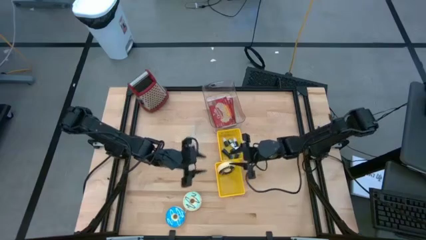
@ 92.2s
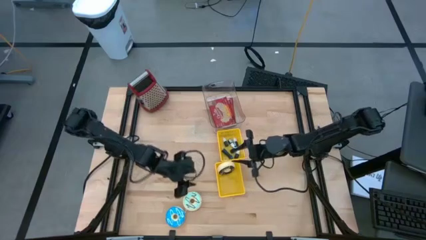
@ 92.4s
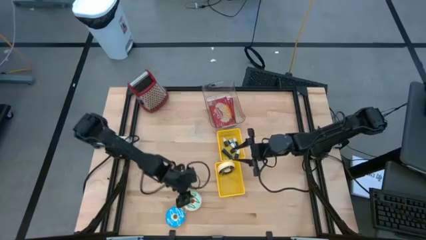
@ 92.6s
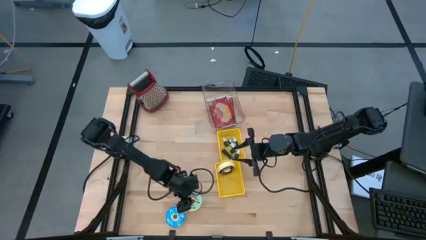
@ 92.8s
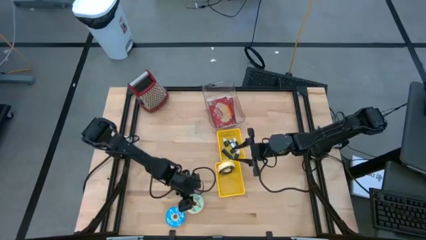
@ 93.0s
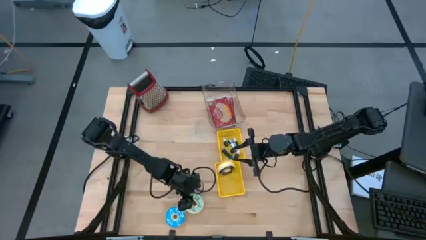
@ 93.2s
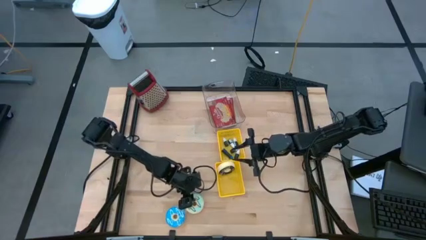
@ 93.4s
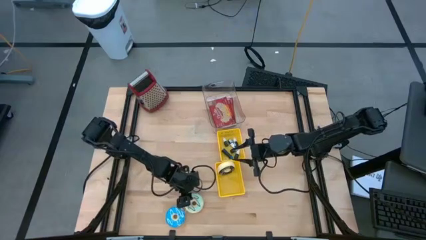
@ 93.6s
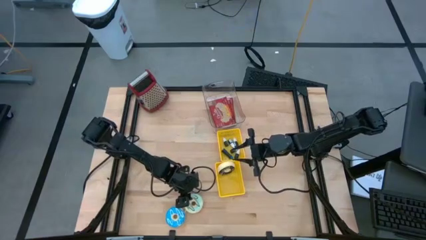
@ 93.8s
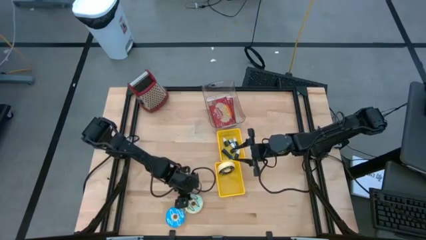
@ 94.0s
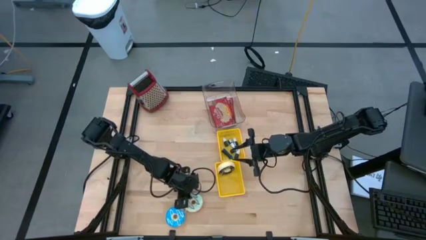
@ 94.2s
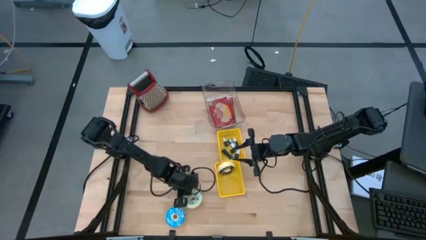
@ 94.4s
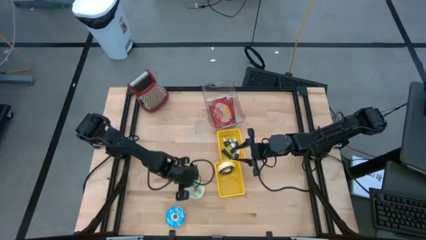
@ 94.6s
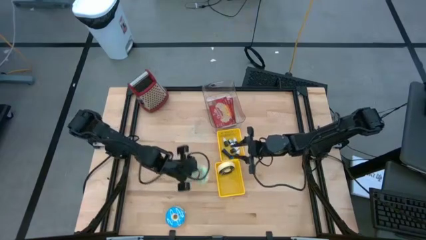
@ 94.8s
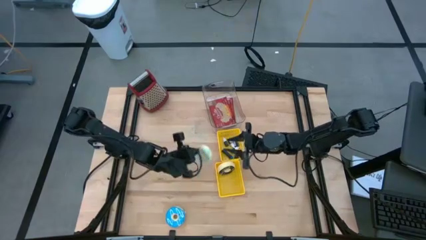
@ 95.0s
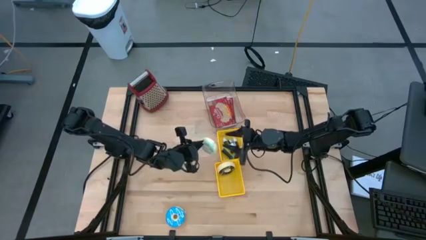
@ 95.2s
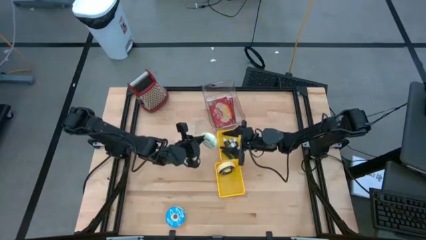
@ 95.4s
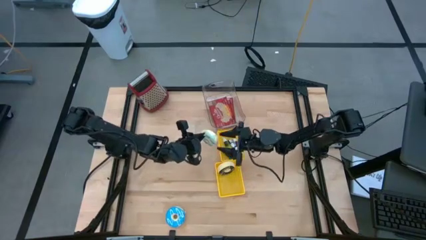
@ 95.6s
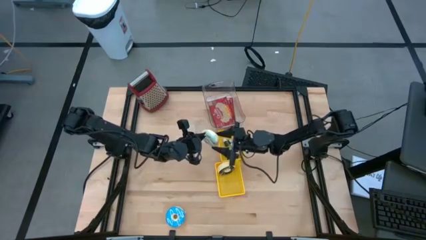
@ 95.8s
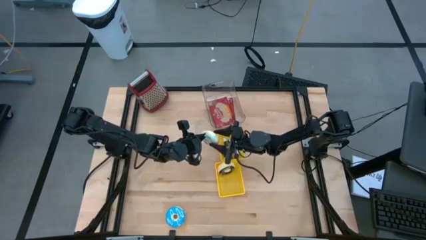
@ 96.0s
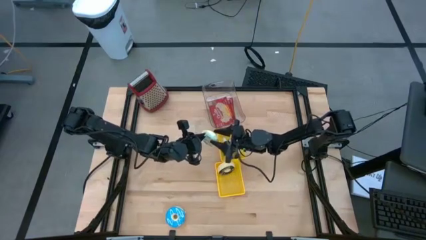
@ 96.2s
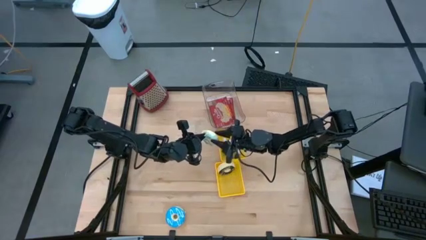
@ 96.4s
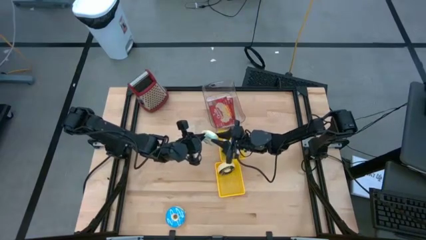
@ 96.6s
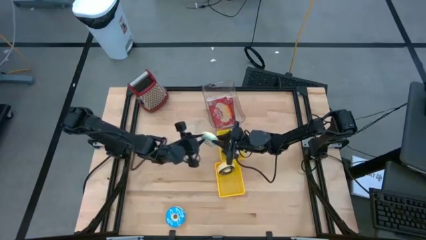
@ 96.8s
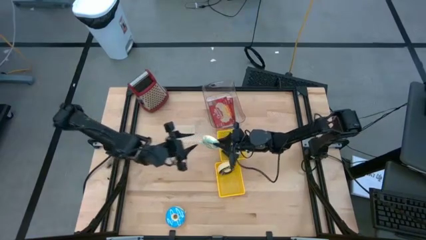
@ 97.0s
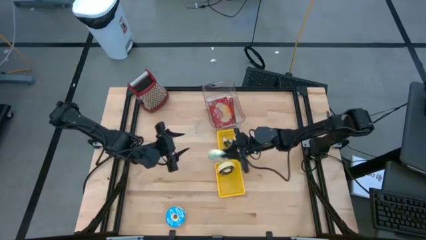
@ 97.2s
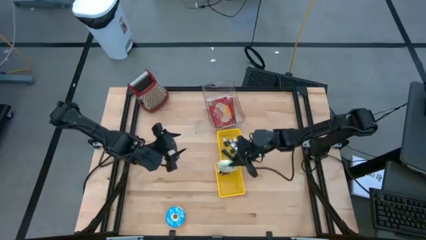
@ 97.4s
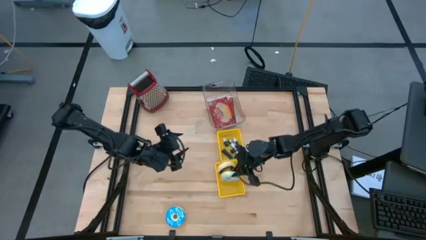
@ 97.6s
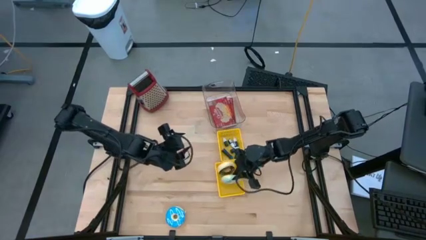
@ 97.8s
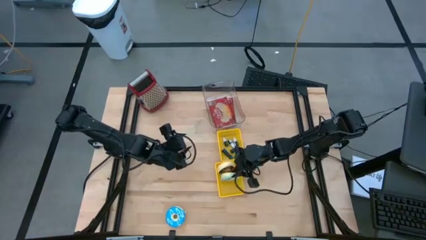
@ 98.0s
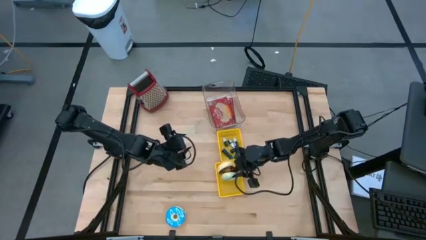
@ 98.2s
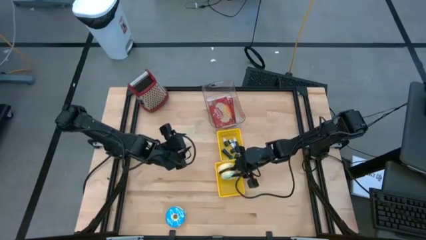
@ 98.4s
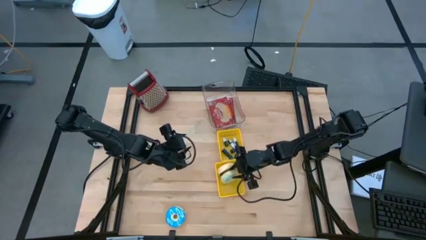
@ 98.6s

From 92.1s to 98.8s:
Put the light blue doughnut into the bottom yellow bin

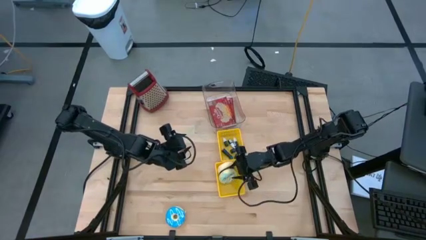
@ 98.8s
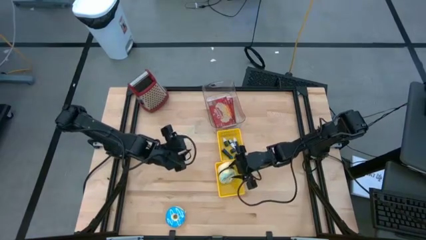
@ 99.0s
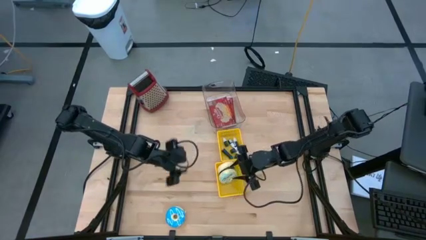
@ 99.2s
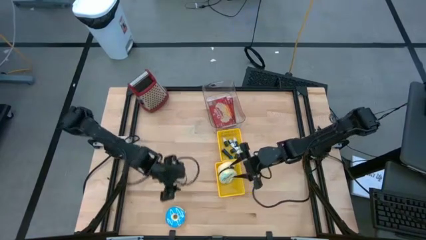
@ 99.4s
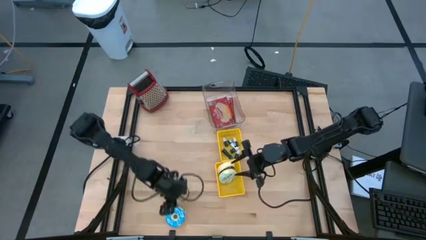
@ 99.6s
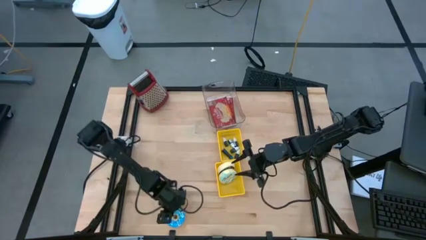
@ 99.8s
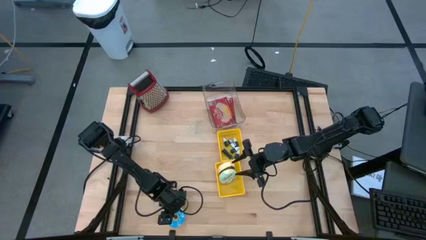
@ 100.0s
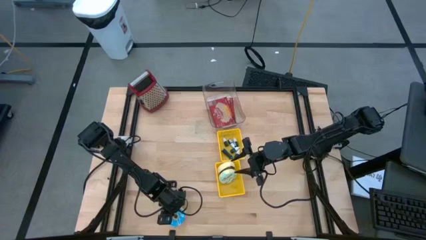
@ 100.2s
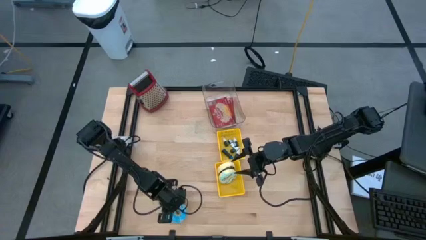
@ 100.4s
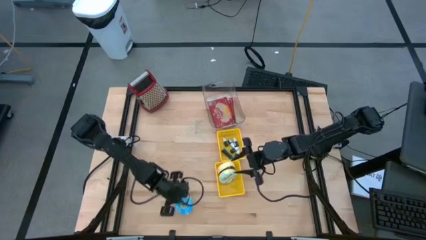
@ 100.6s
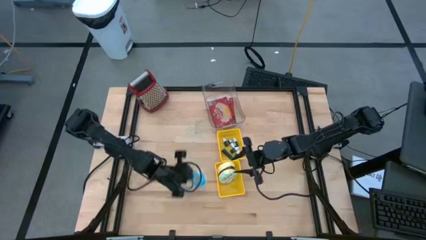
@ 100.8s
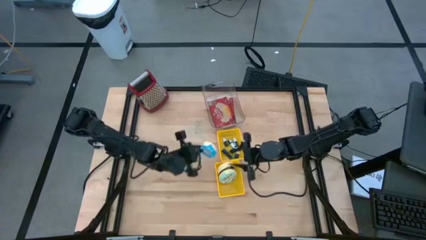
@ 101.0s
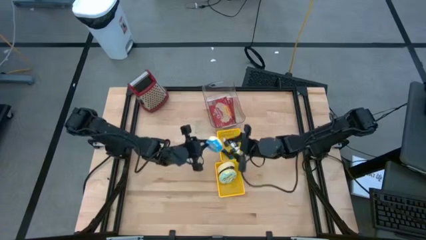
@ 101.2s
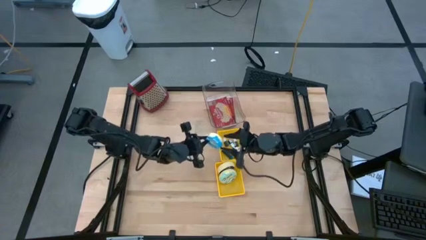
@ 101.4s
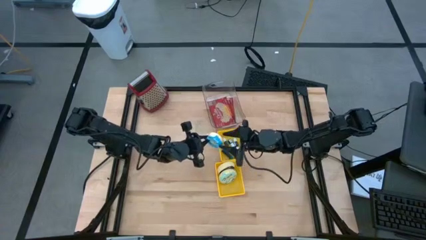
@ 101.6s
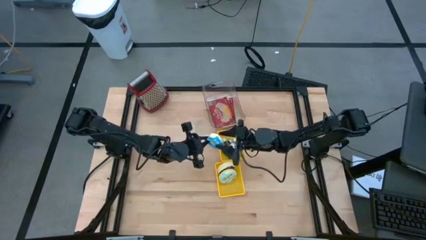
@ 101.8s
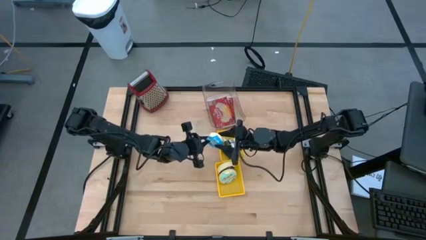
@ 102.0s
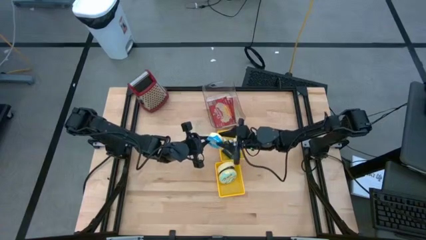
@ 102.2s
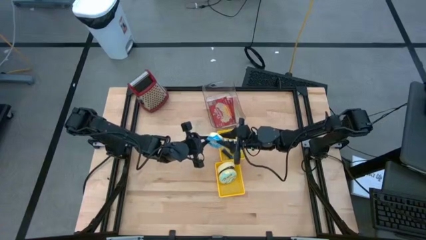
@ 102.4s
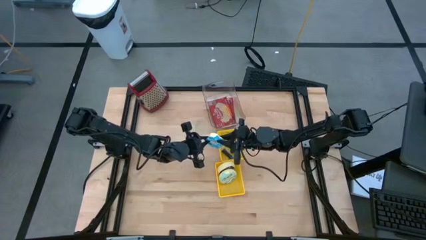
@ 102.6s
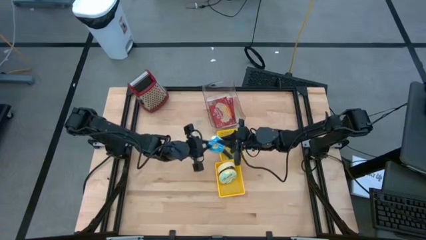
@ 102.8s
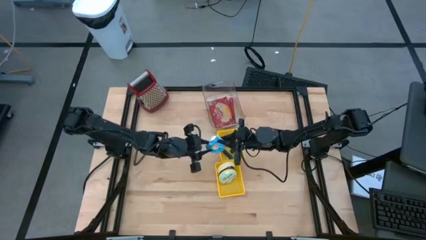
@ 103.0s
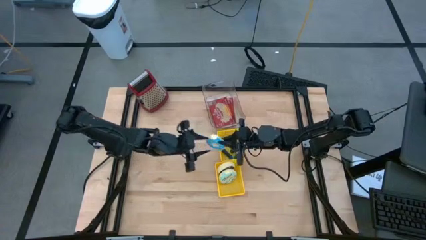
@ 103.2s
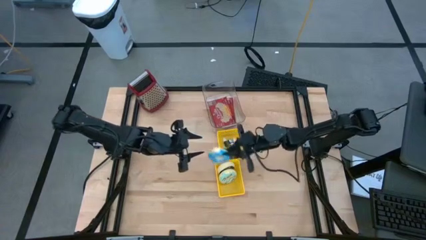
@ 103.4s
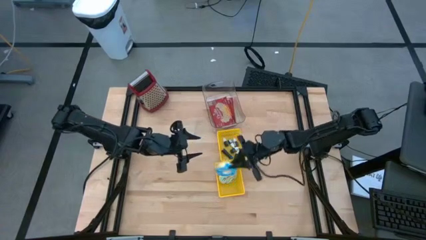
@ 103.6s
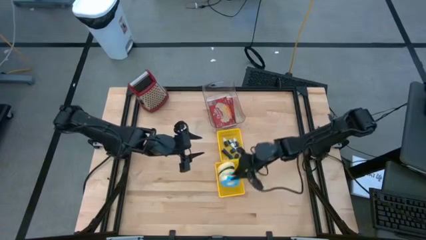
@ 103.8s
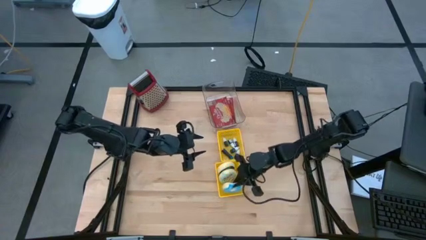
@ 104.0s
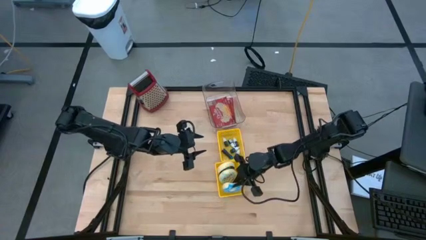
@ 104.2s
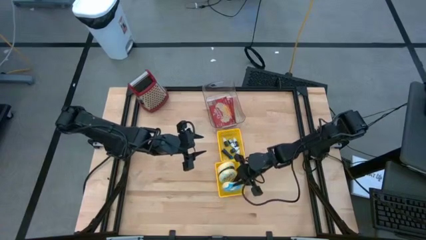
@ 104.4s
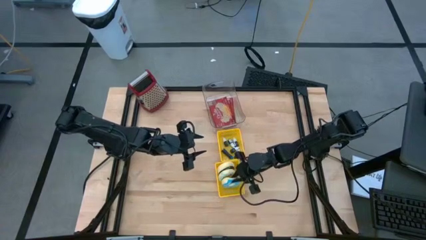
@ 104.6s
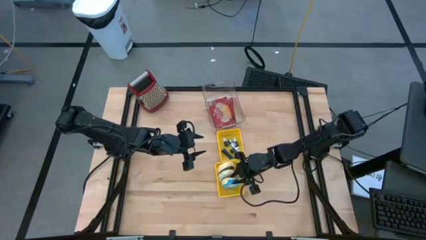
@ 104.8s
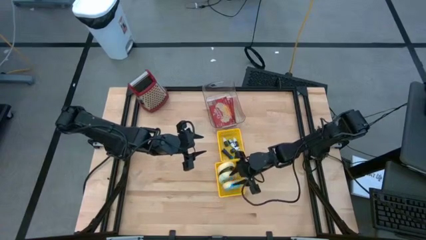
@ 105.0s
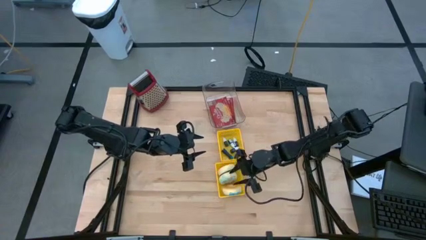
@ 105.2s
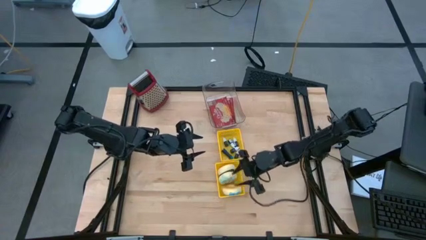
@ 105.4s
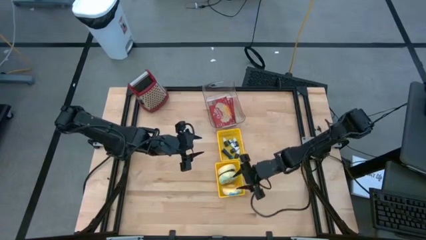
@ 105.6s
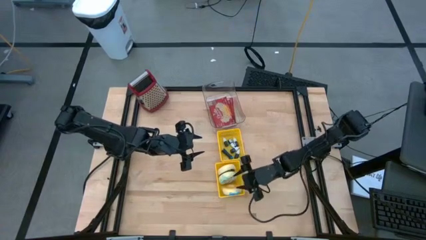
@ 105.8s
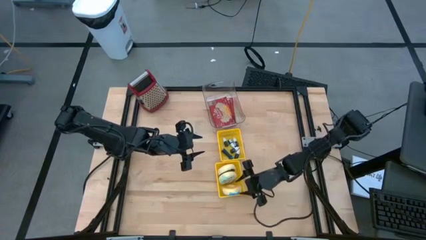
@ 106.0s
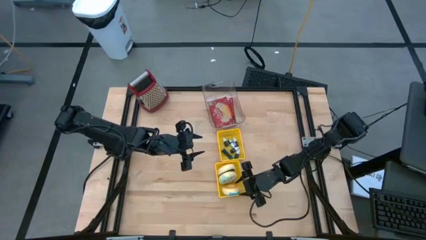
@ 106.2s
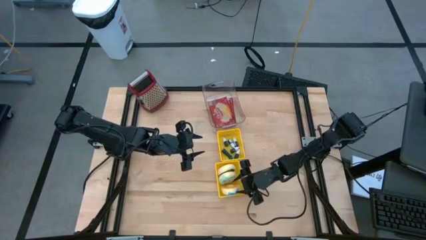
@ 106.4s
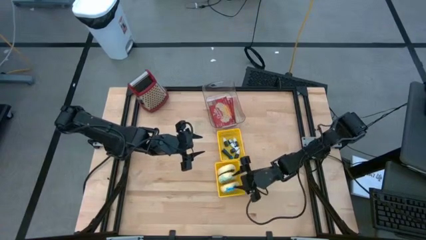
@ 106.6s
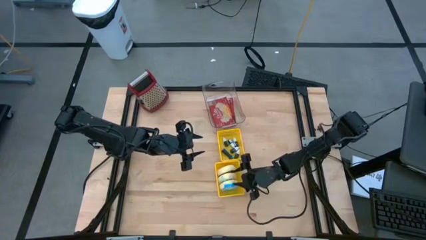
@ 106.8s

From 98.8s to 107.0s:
Put the blue doughnut into the bottom yellow bin
